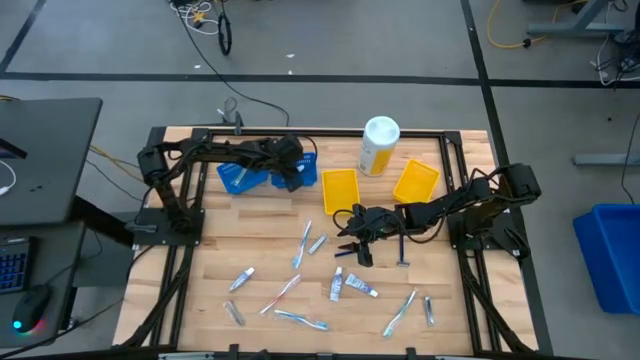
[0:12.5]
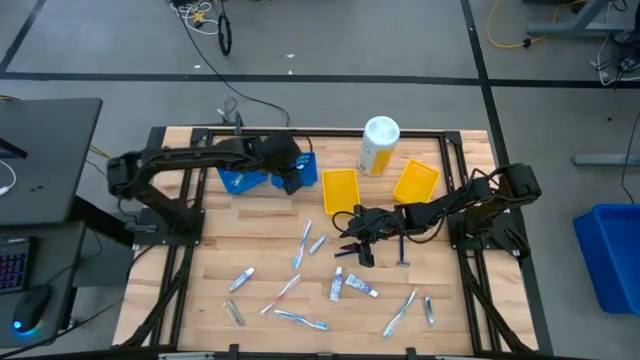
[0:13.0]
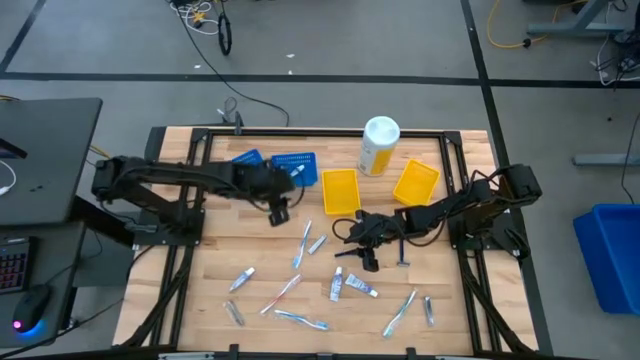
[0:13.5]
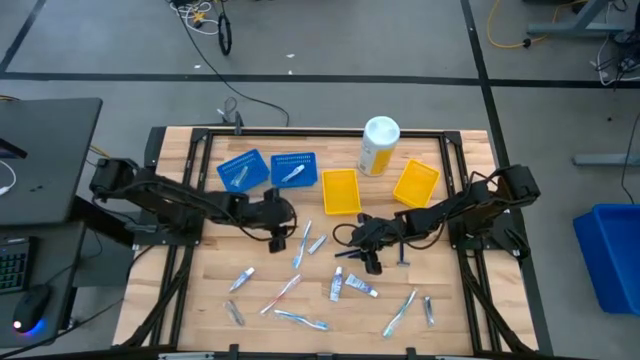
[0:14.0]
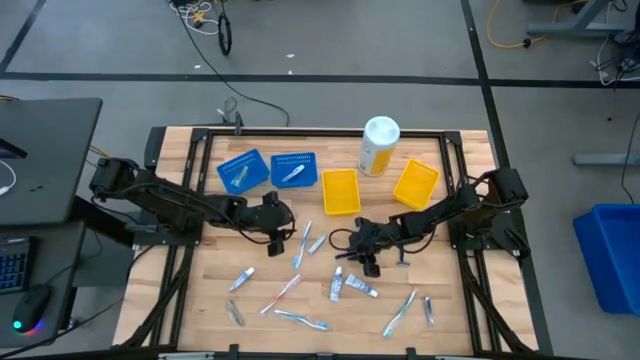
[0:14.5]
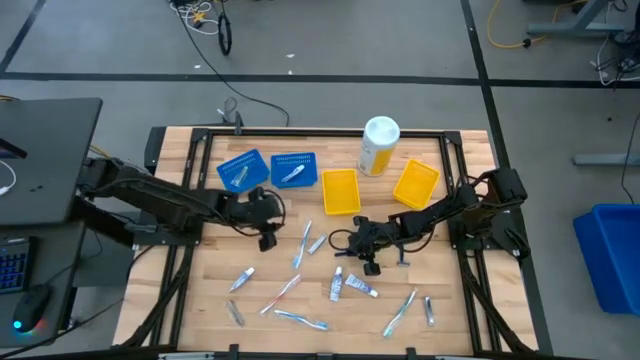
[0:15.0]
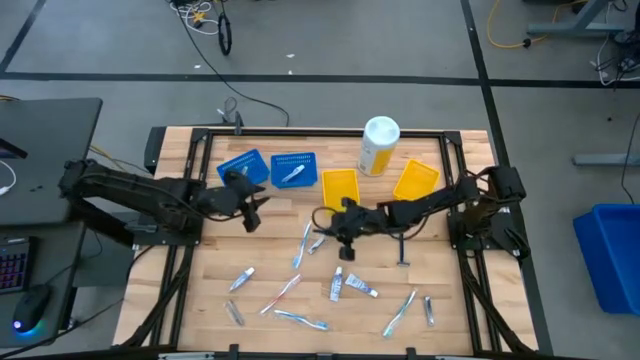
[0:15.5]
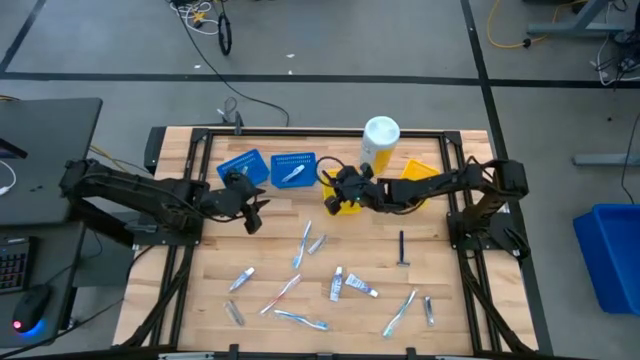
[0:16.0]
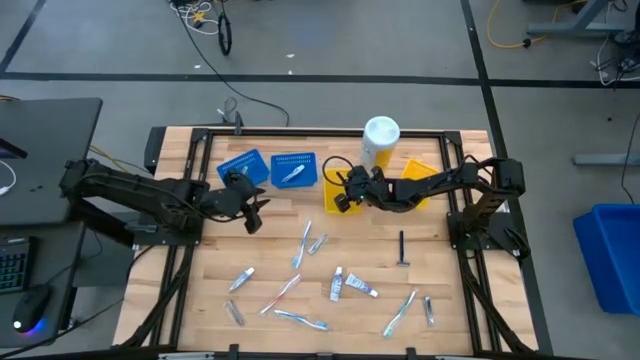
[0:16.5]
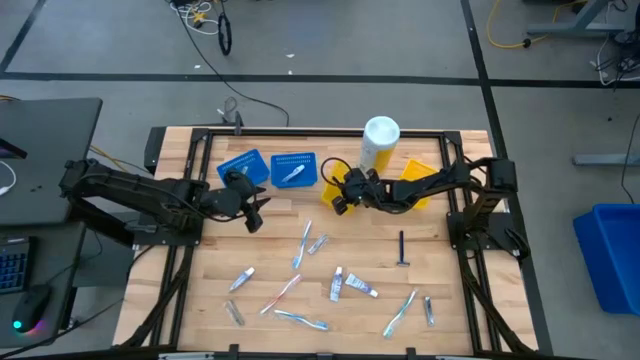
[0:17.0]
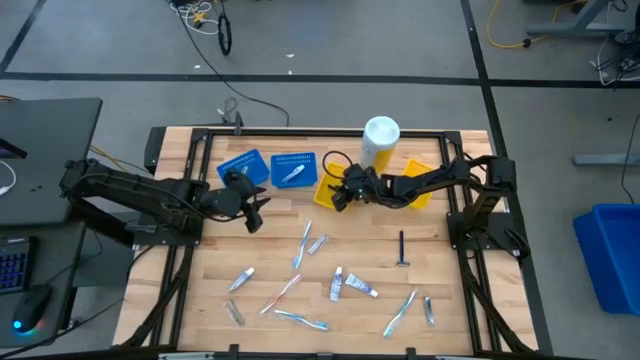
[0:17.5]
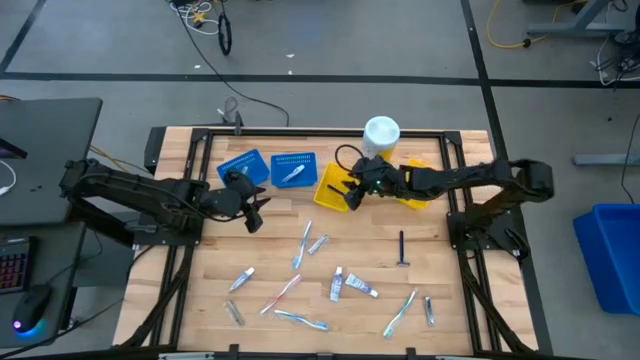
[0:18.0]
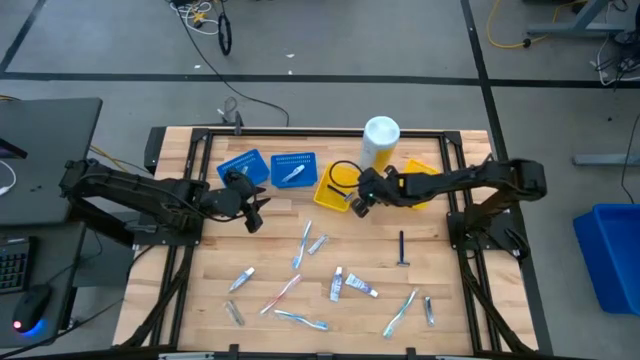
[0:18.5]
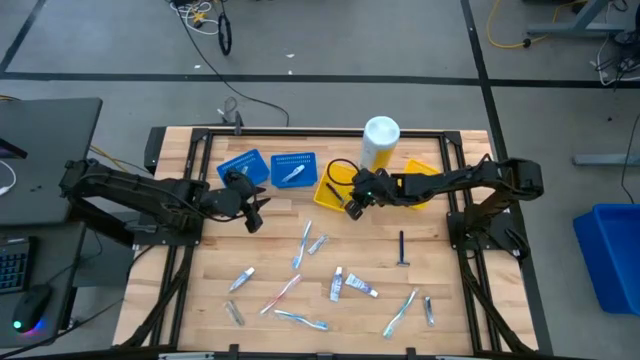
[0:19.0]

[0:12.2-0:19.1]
Task: Pick & Place Travel size toiletries
Put the blue razor into the left yellow bin

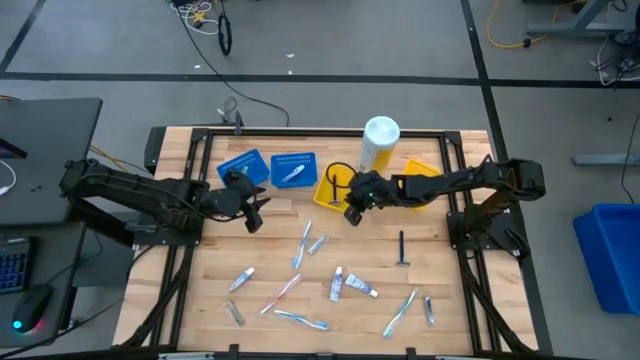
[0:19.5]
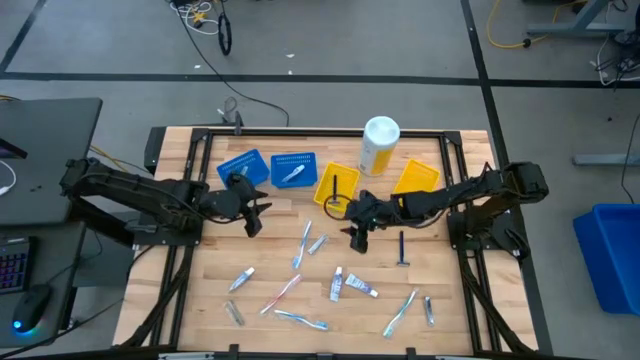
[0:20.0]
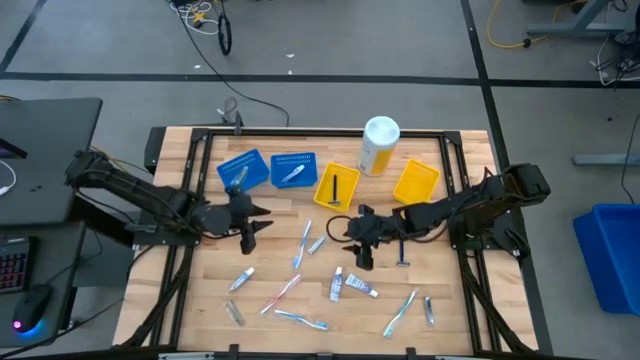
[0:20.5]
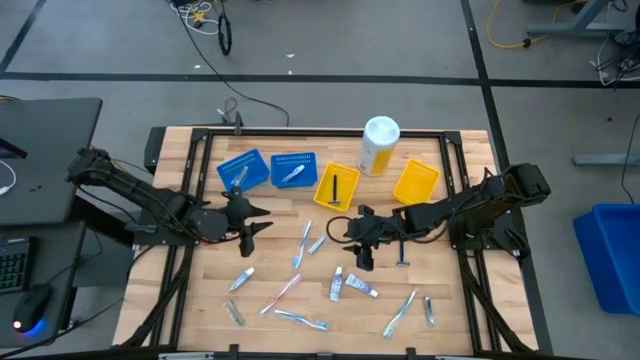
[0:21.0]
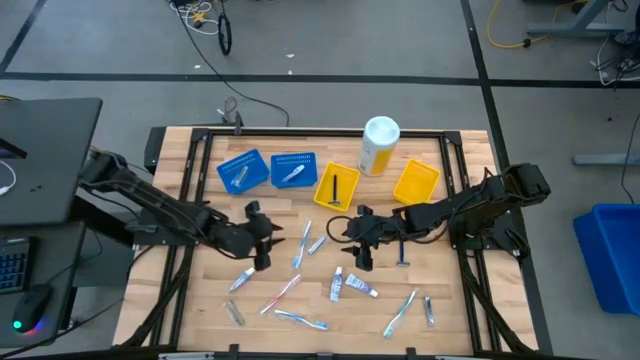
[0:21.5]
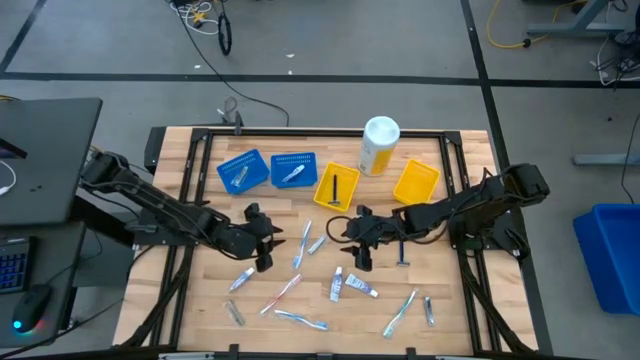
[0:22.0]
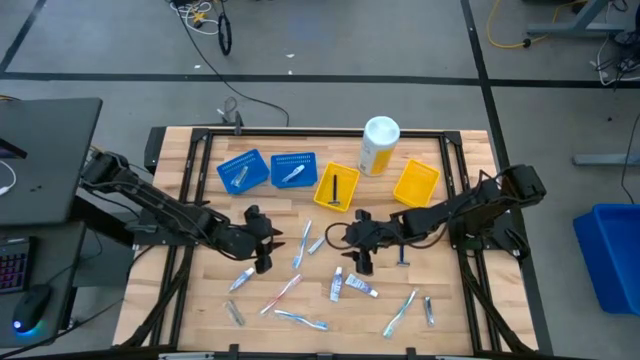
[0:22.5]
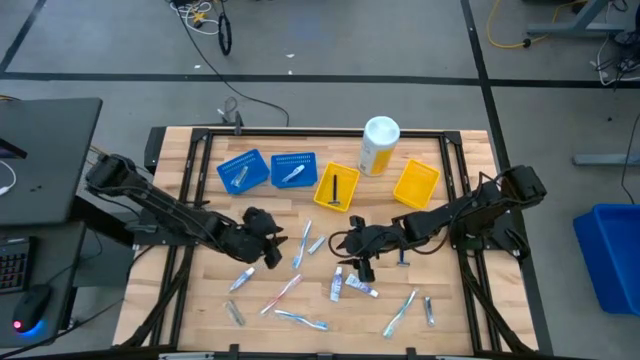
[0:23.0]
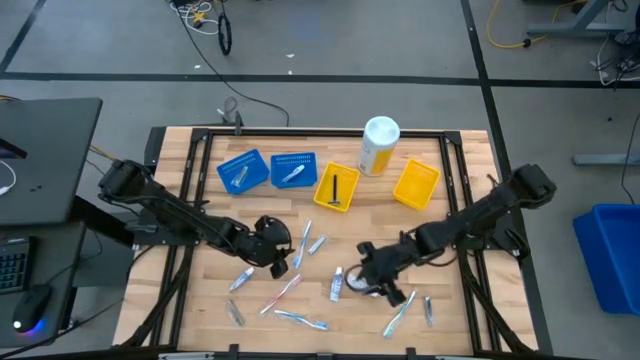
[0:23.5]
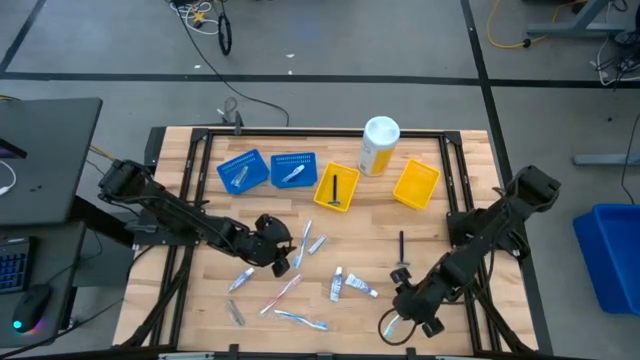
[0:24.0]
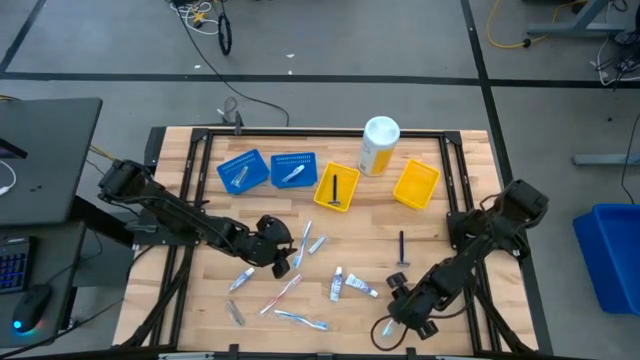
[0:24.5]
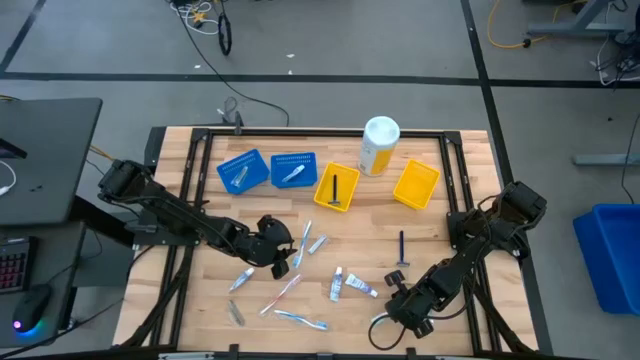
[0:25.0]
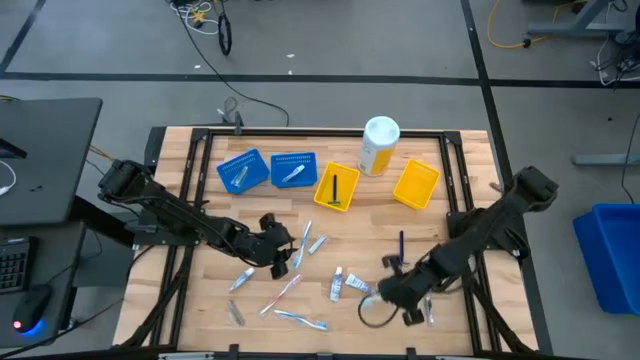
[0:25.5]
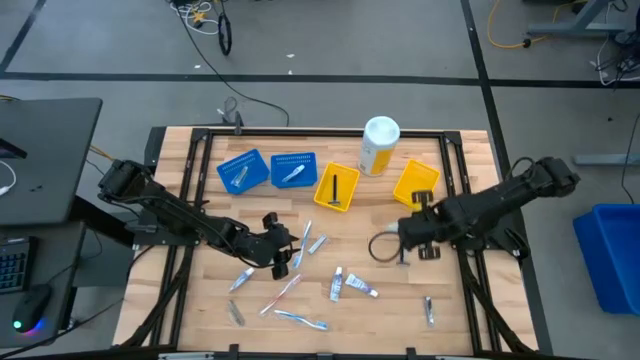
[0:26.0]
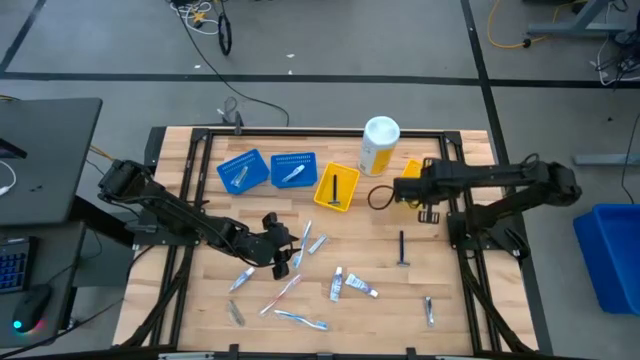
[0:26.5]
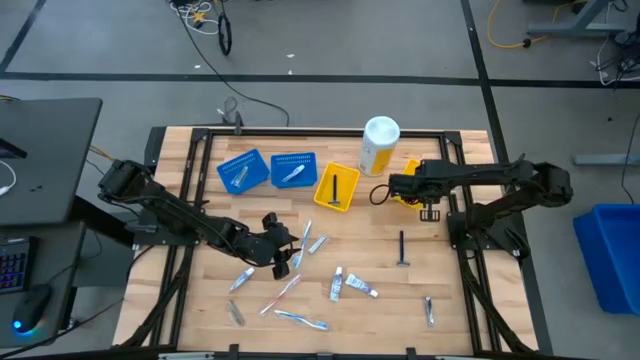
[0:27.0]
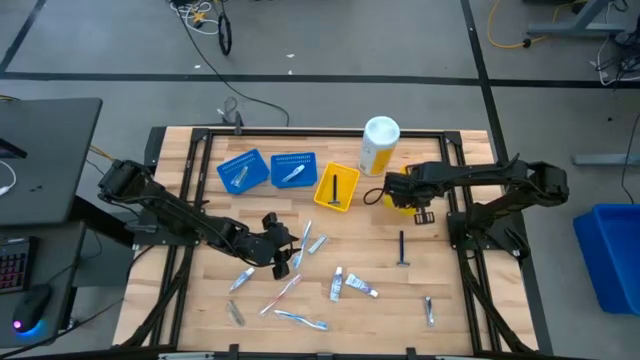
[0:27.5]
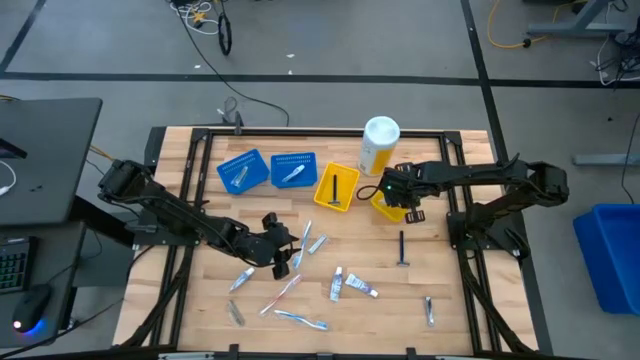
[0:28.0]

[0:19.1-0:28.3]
Put the green toothbrush into the right yellow bin

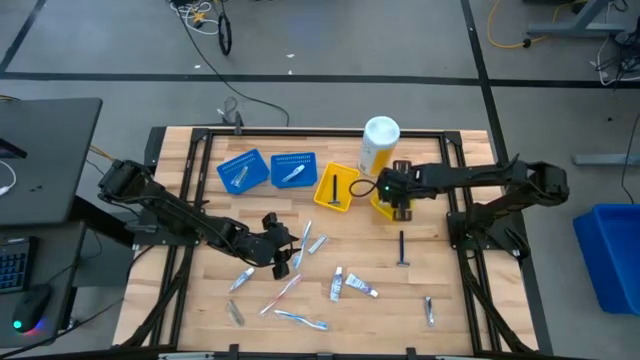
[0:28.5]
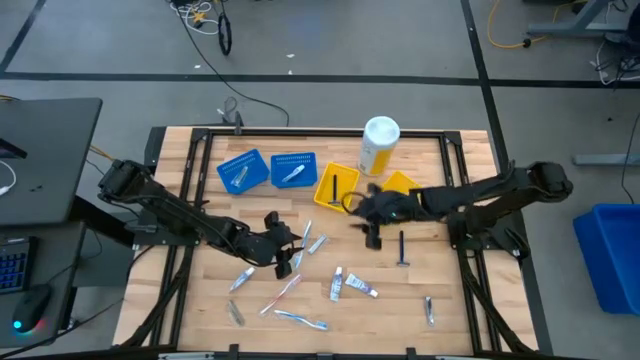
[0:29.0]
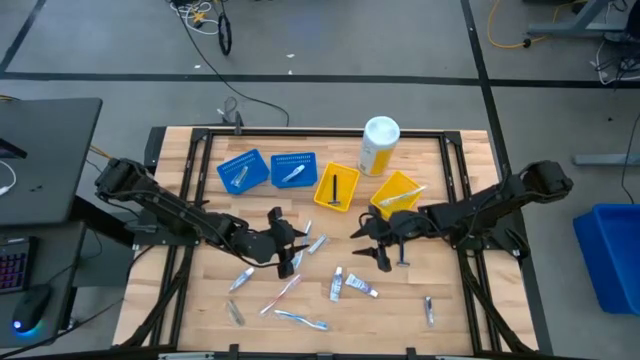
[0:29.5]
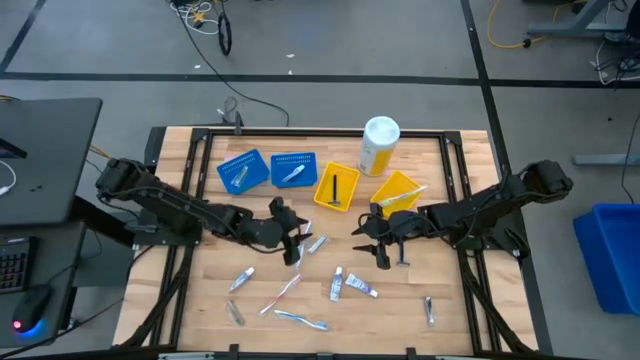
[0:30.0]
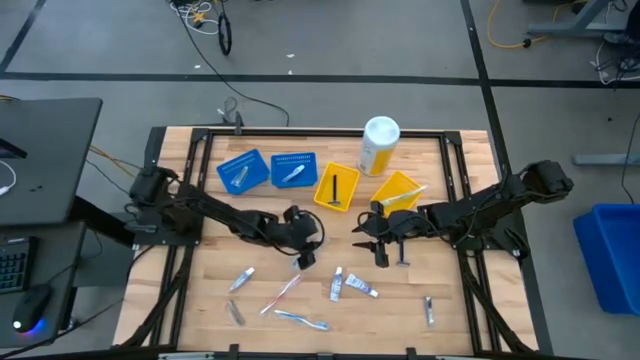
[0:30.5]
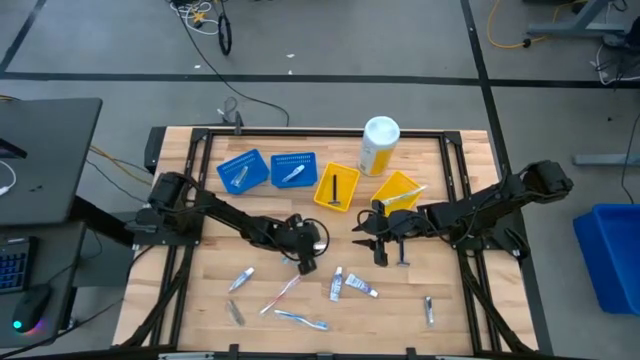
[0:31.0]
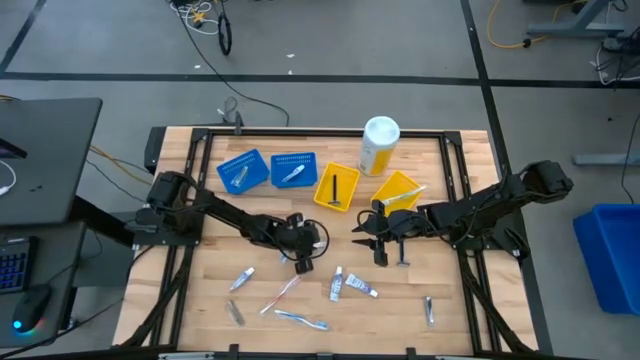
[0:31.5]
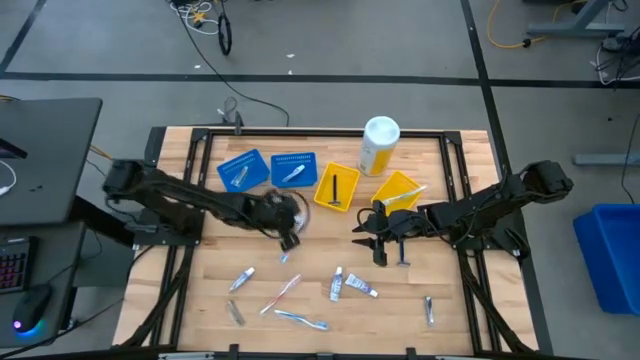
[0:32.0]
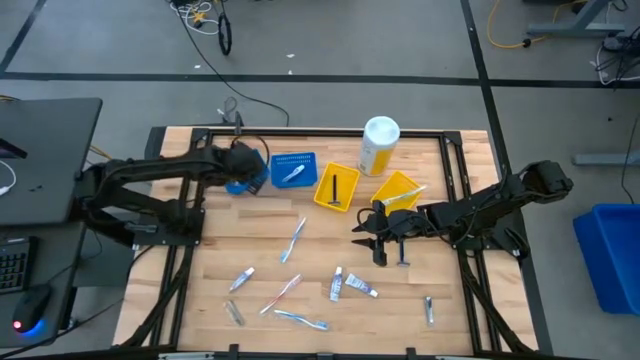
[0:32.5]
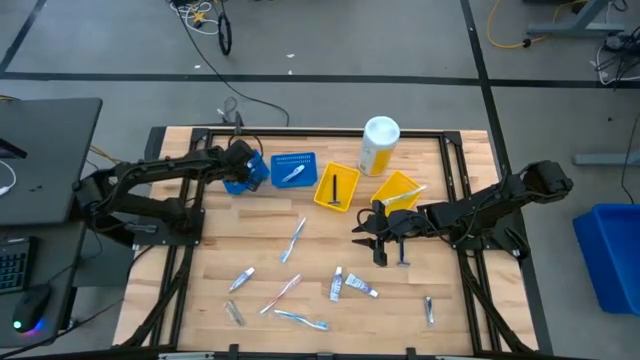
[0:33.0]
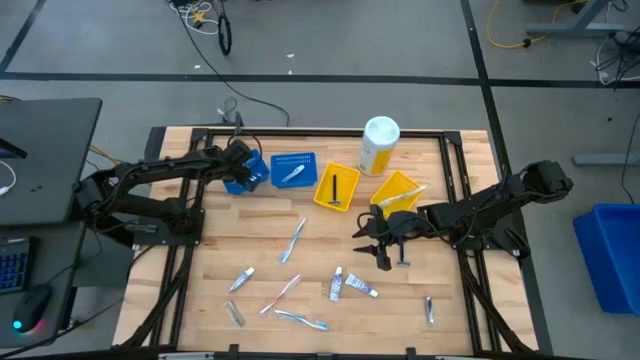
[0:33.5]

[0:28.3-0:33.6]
Put the silver nail cutter into the left blue bin
